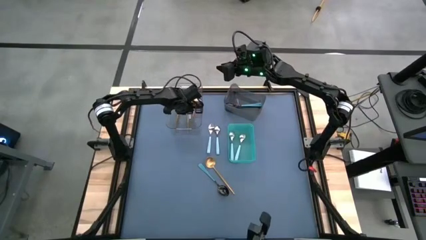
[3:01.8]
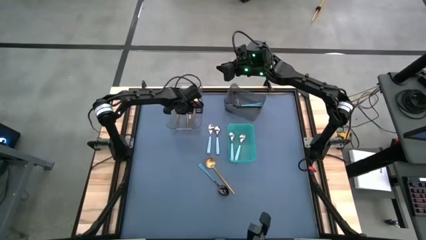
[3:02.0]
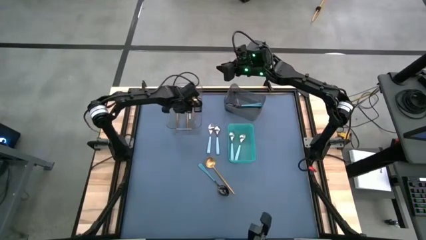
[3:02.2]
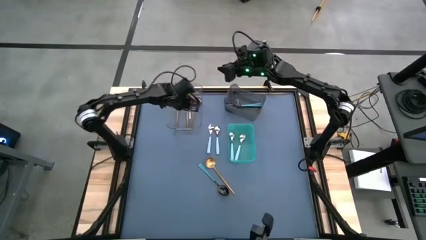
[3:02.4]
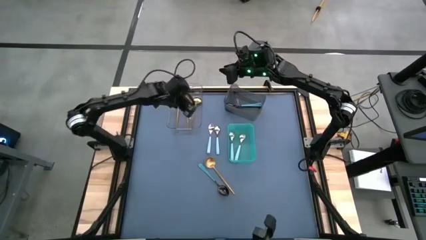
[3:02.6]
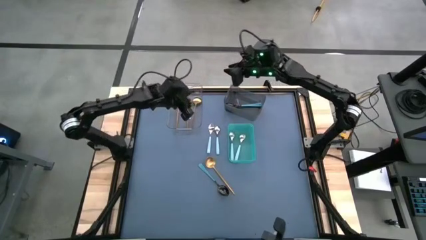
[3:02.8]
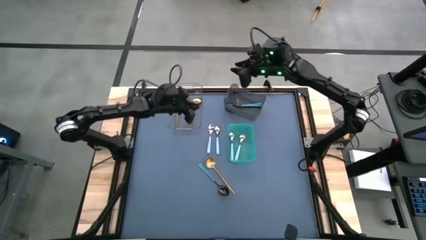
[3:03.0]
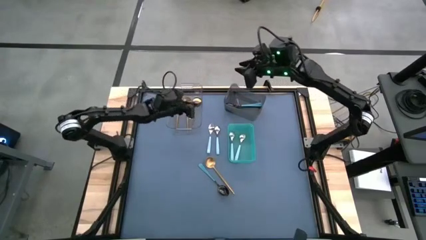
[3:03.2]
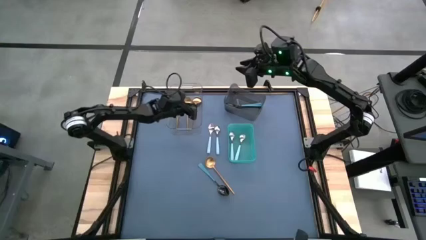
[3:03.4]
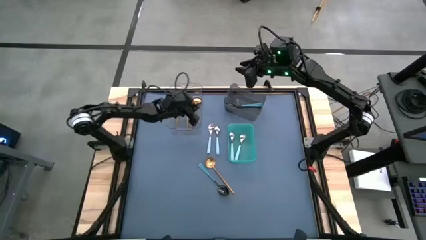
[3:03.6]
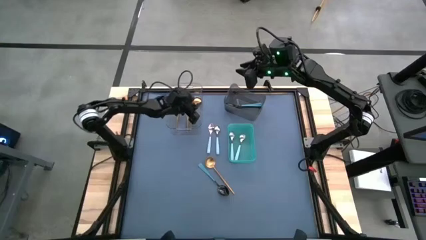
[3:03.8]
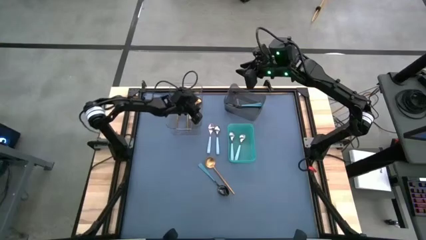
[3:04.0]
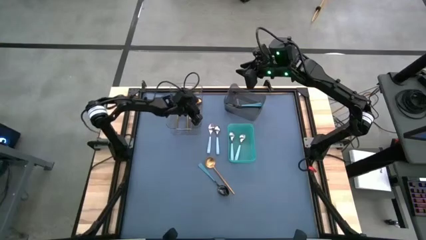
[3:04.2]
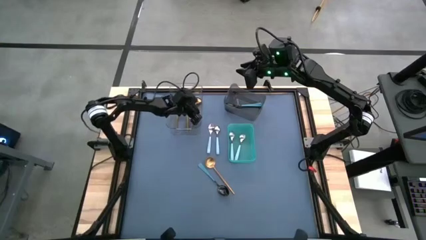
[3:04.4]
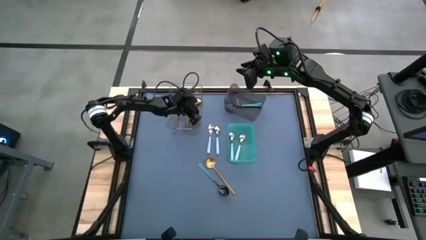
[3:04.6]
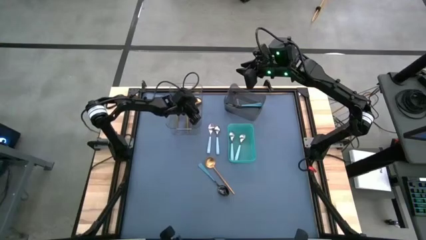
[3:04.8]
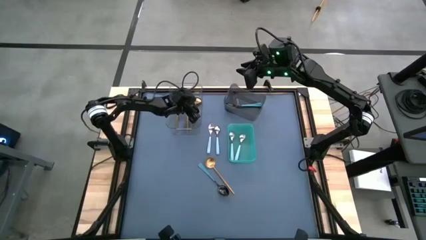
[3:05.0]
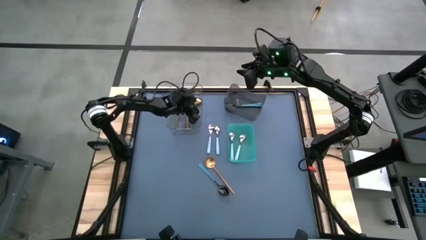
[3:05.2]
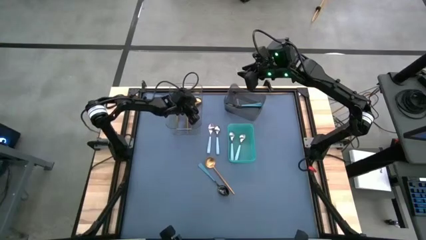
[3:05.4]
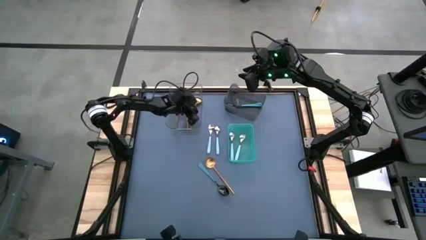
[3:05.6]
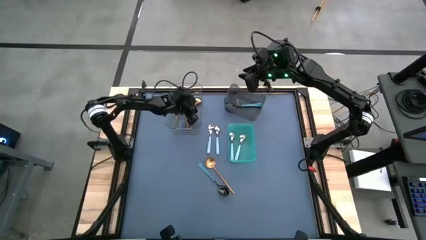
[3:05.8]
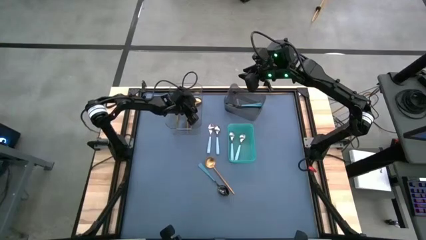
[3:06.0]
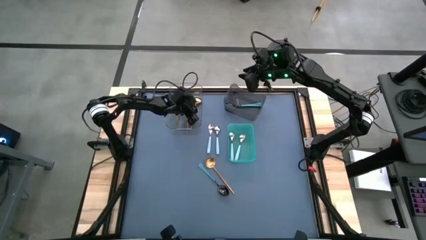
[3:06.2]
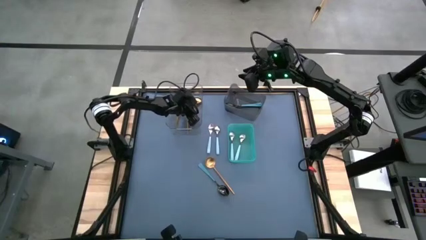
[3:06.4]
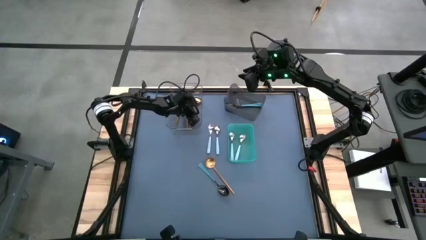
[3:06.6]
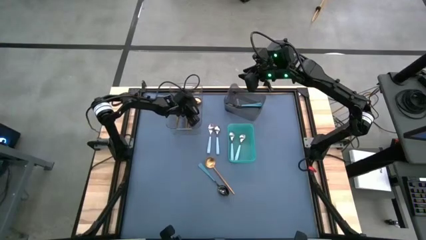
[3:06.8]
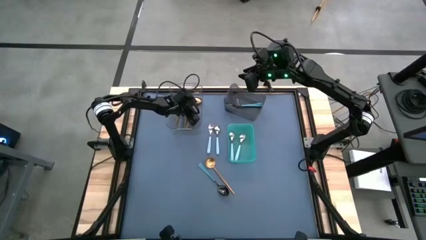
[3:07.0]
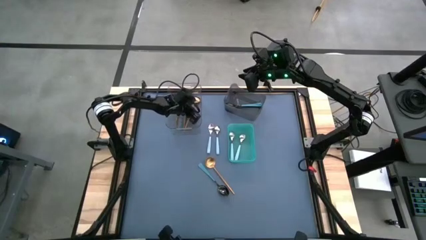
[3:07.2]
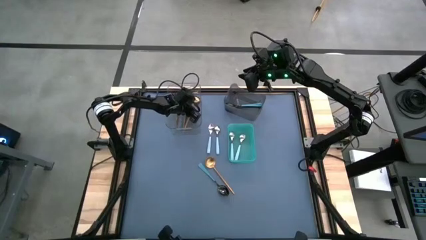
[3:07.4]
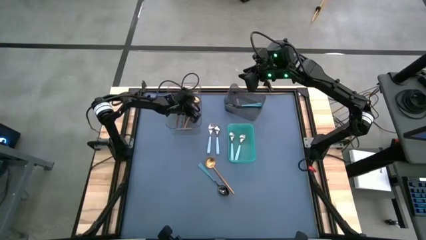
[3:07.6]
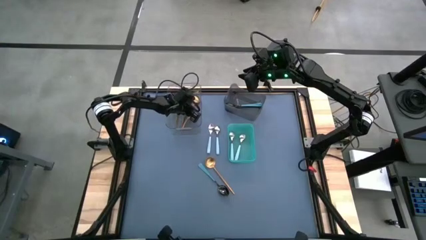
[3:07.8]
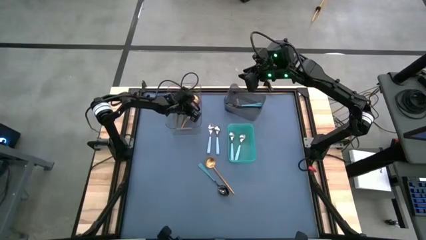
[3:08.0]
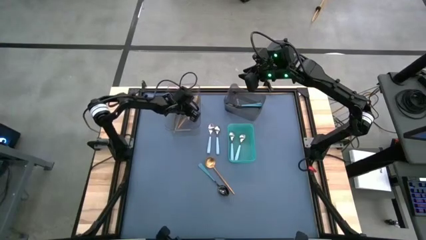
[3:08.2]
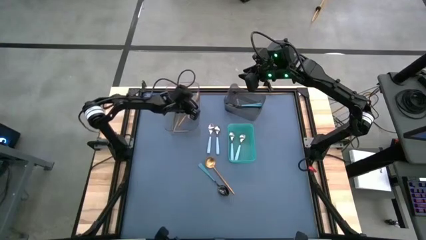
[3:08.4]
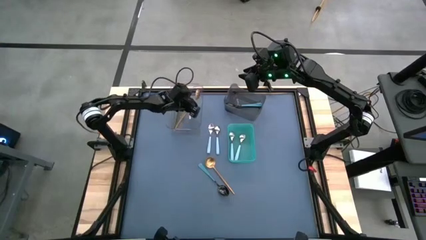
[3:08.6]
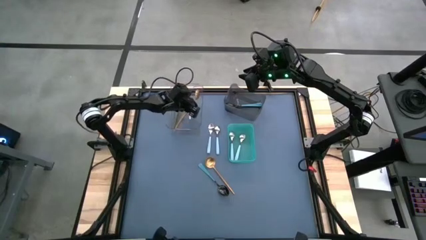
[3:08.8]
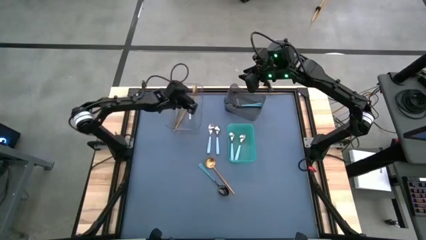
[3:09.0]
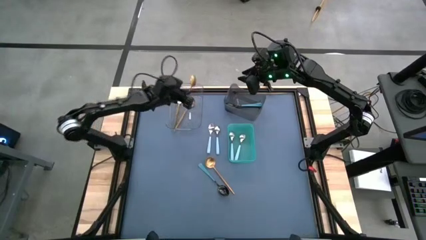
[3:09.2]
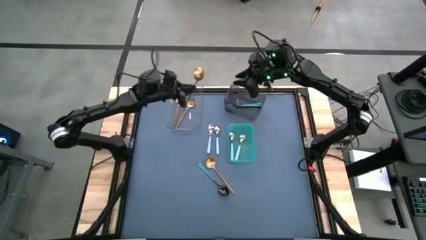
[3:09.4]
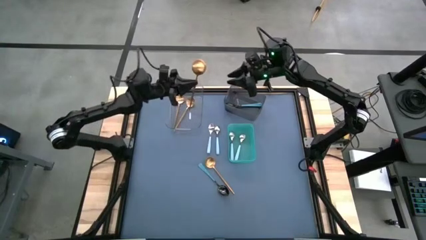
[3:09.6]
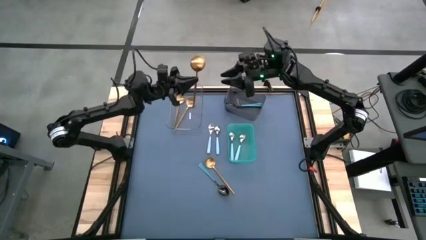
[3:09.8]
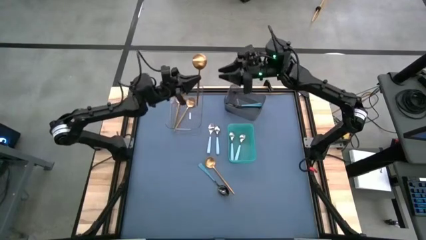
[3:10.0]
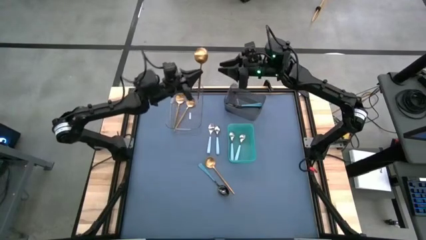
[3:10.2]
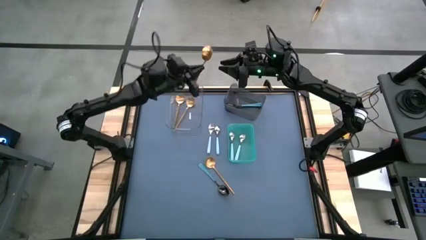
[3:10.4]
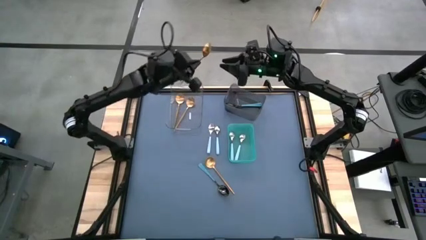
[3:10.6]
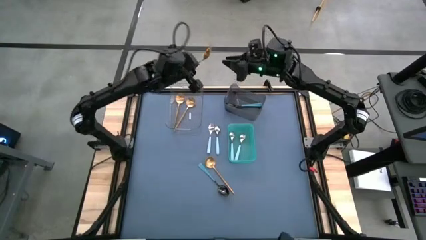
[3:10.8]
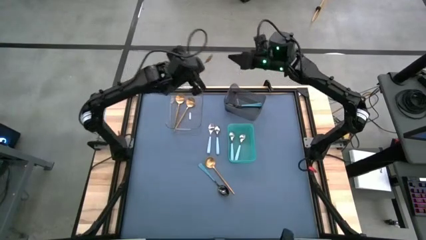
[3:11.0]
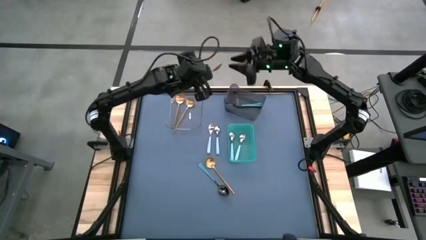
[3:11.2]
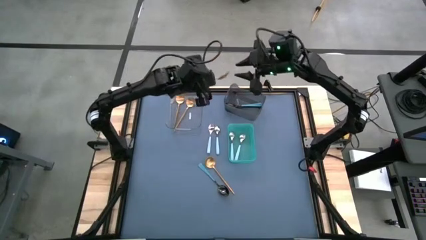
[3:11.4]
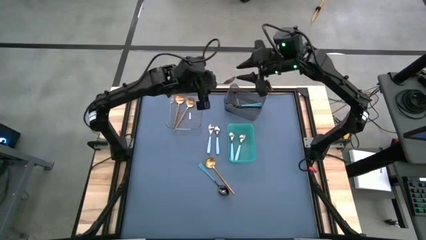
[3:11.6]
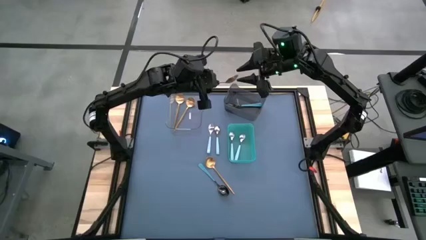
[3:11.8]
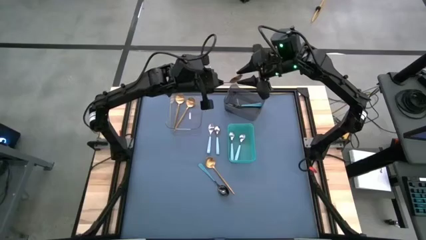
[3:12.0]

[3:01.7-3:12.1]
Task: Sort silverware by color (type)
Adjust the gold spoon in the transparent bin
